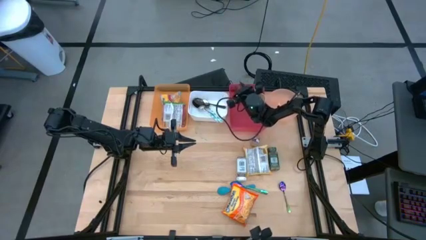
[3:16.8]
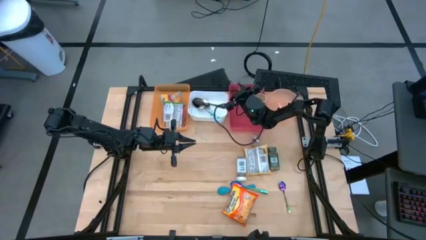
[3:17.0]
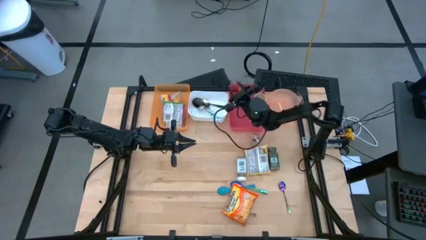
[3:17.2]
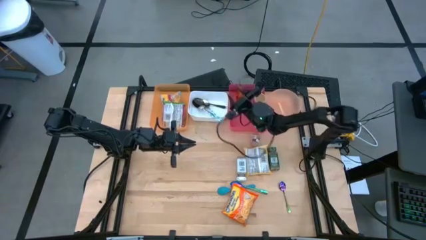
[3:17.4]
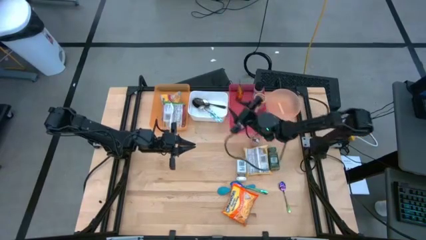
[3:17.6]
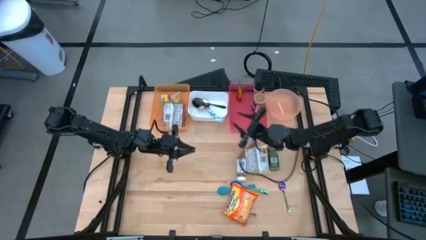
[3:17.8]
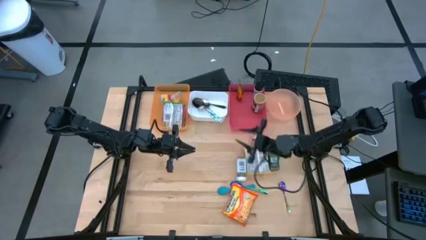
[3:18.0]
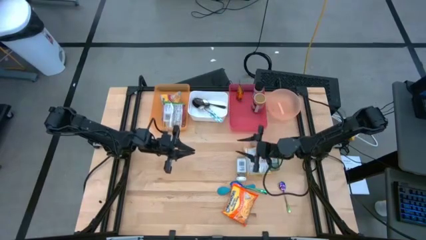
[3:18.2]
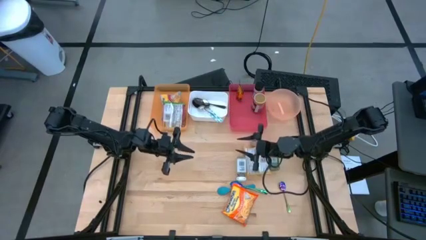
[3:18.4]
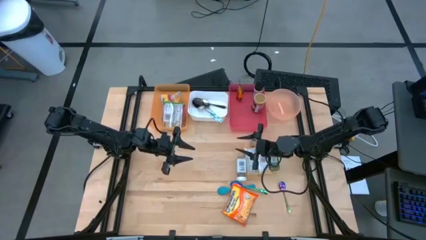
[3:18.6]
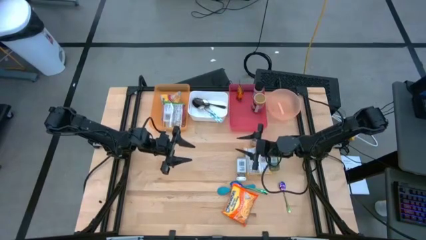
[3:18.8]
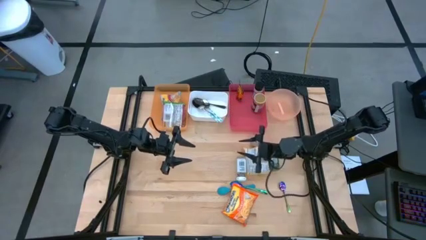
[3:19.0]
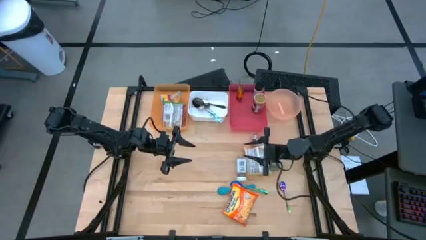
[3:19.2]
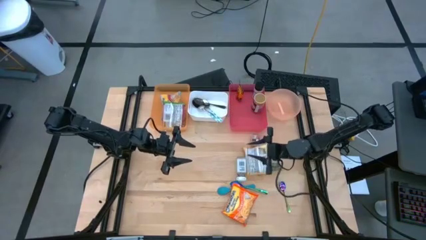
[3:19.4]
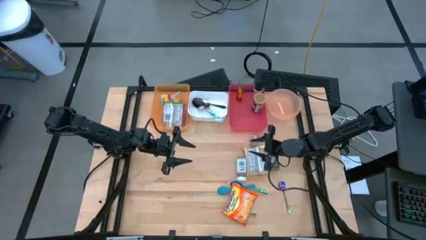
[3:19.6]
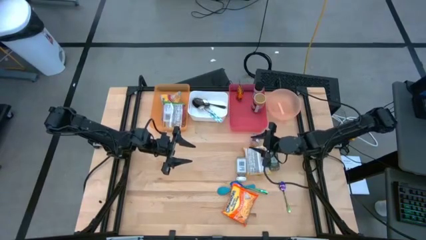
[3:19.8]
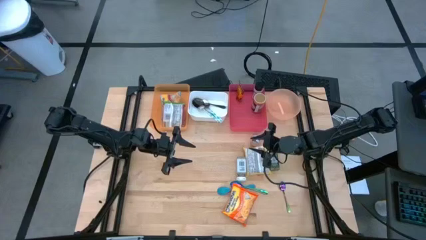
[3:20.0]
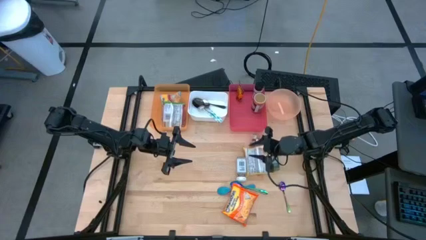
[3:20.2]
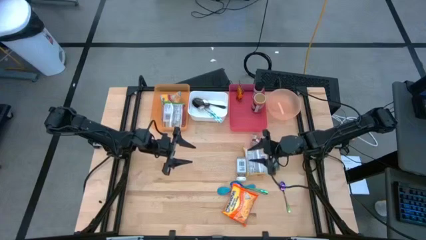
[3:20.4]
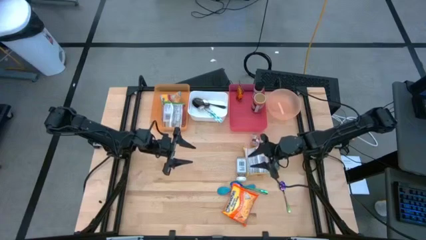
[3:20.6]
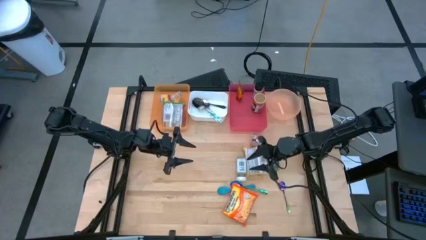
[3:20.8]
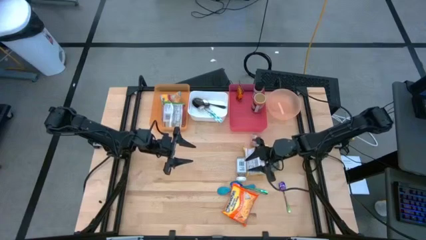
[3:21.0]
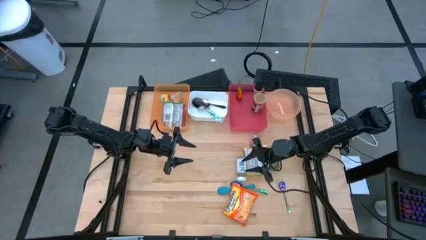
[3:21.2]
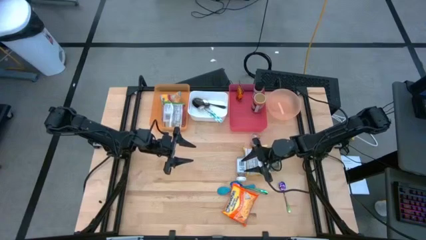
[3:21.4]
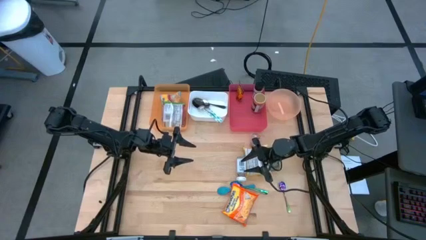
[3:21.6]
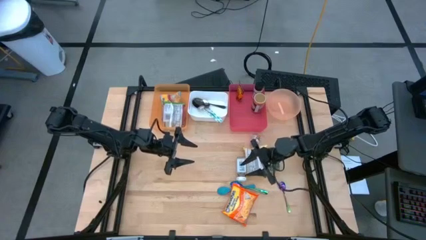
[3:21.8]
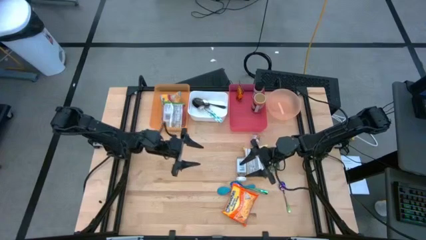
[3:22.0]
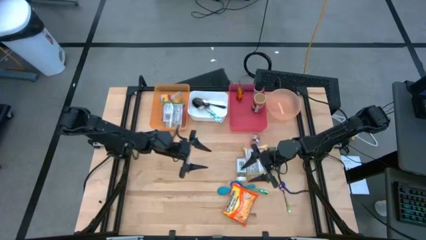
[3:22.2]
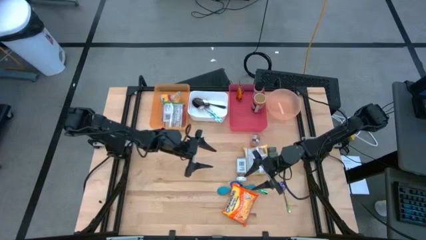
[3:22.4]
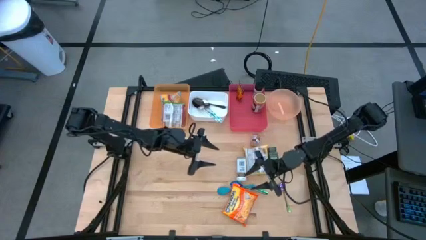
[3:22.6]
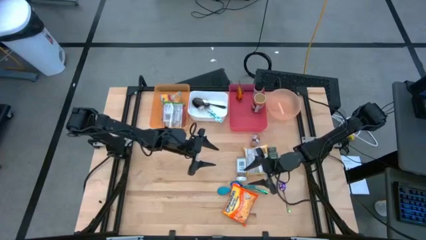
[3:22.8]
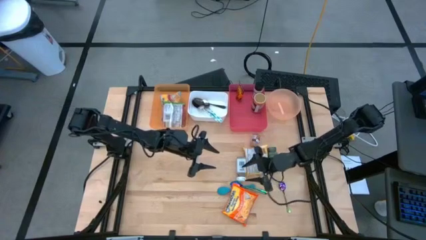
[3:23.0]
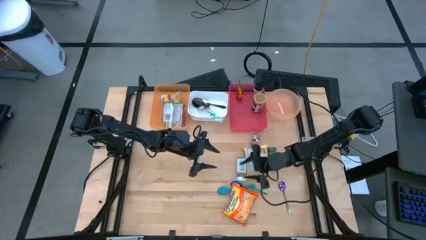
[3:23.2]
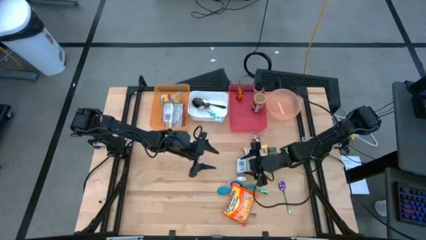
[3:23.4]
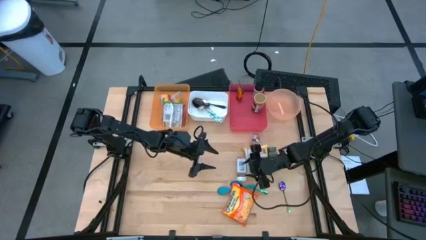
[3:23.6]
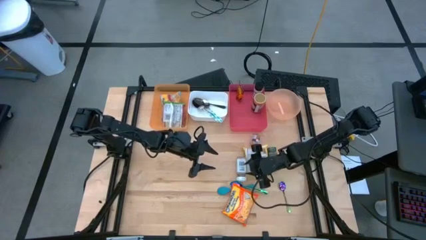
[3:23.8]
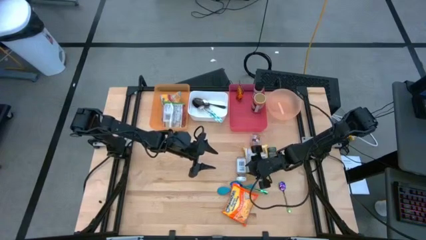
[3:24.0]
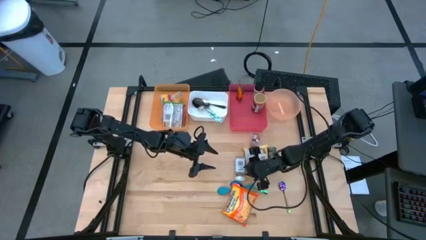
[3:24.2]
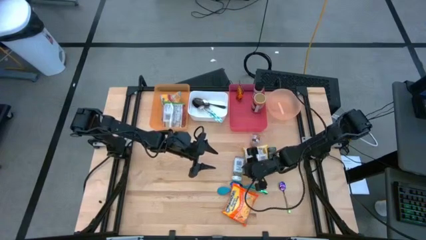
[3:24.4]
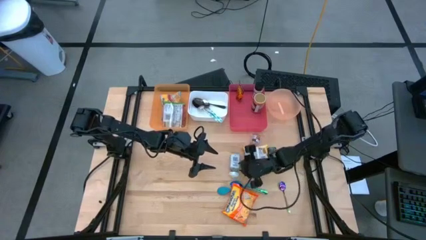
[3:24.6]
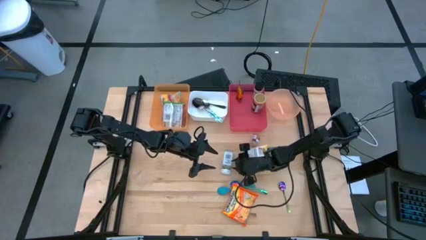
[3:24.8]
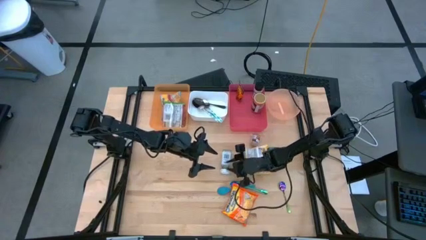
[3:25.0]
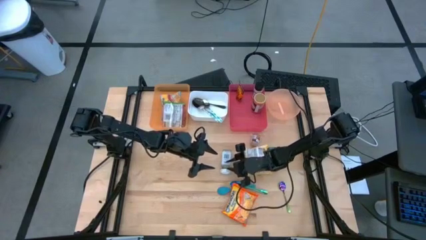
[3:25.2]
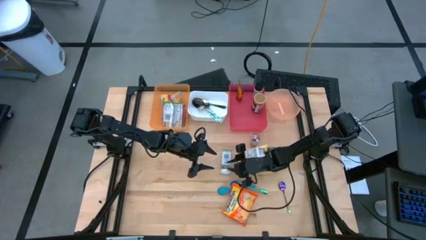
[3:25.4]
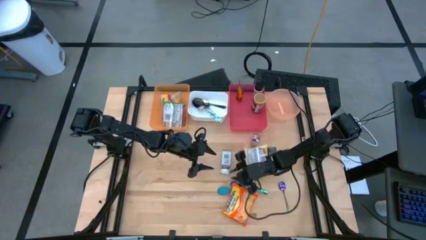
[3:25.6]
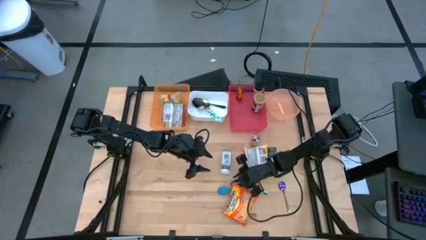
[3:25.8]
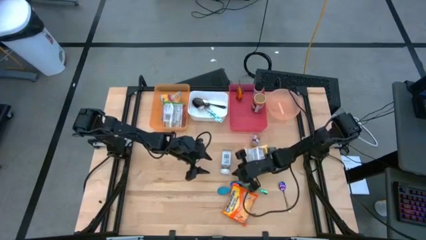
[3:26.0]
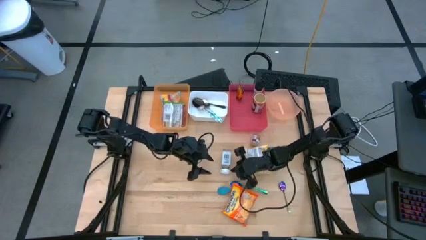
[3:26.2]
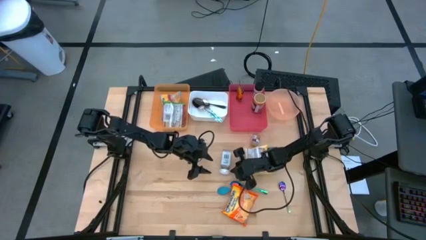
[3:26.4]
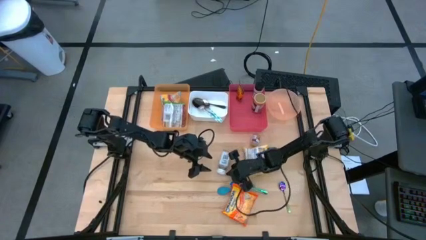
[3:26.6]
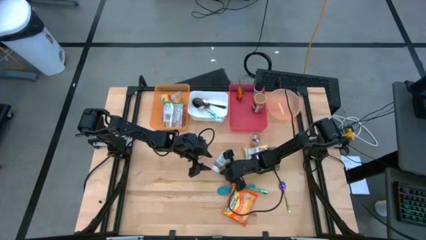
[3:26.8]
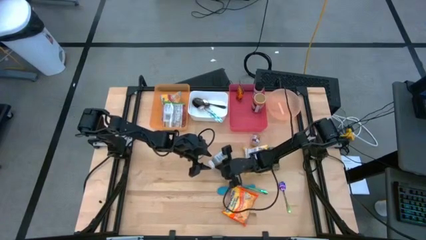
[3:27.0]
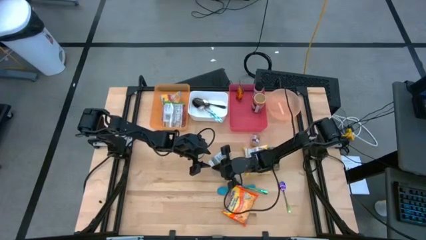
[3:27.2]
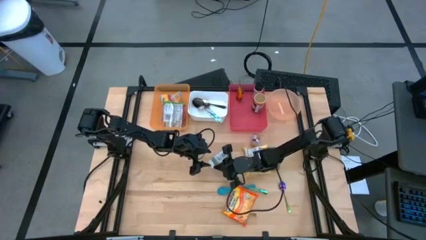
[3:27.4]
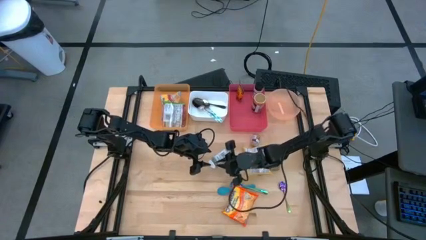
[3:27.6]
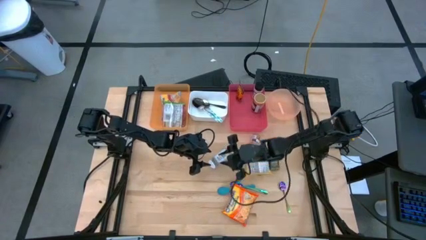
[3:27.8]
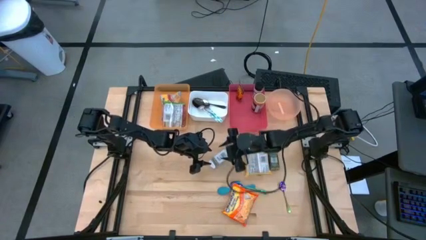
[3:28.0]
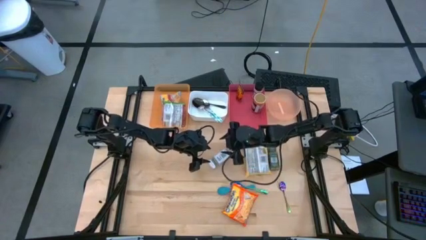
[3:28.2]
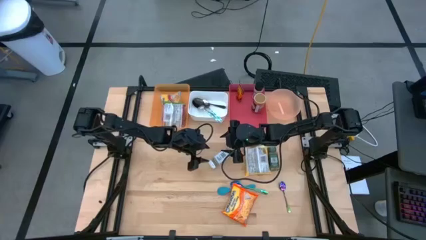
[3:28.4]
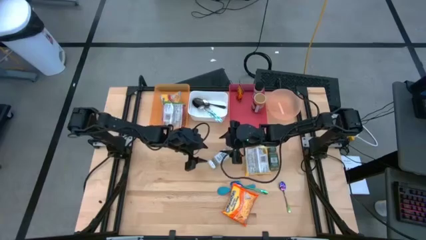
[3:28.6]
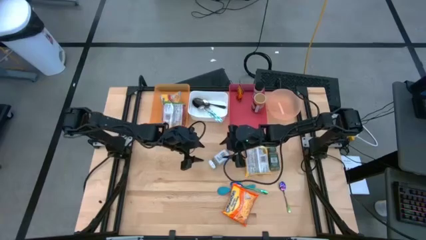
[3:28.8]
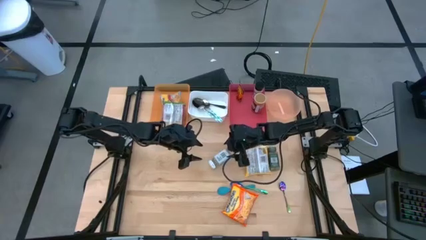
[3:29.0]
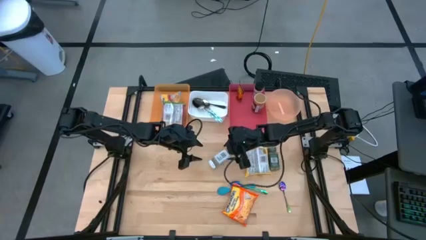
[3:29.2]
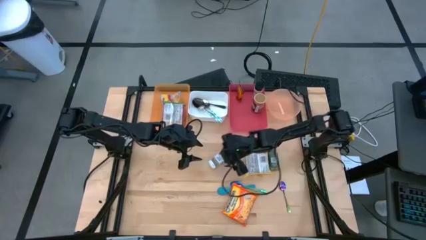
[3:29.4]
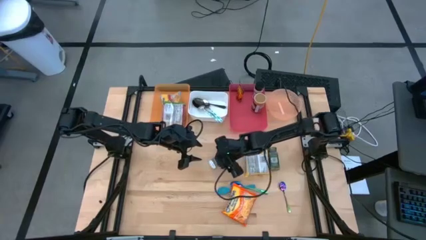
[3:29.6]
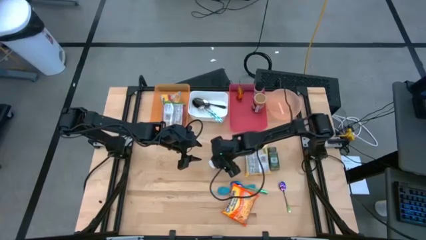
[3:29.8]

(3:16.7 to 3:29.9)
Task: Pick & Place Food Item
Put the white seasoning bottle into the red bin
